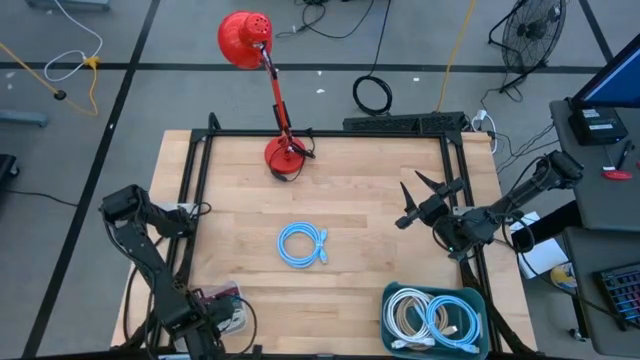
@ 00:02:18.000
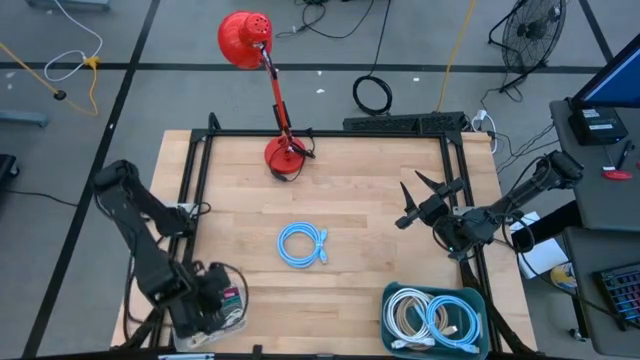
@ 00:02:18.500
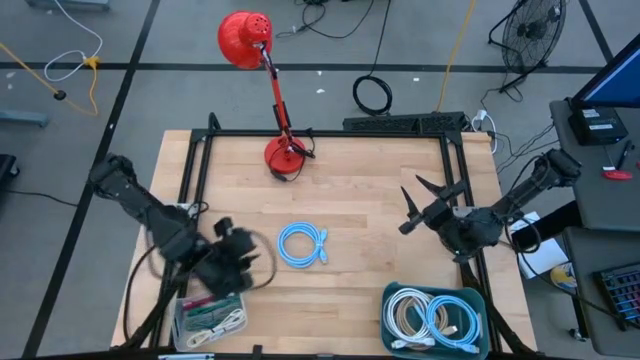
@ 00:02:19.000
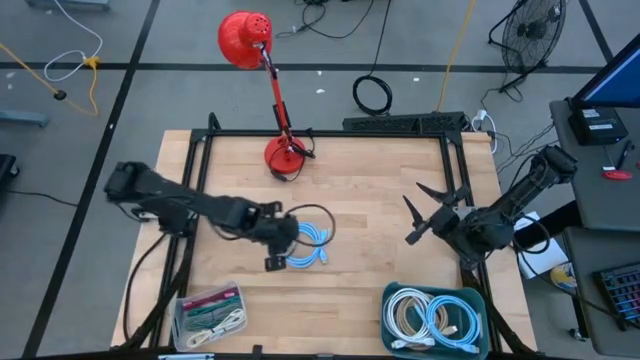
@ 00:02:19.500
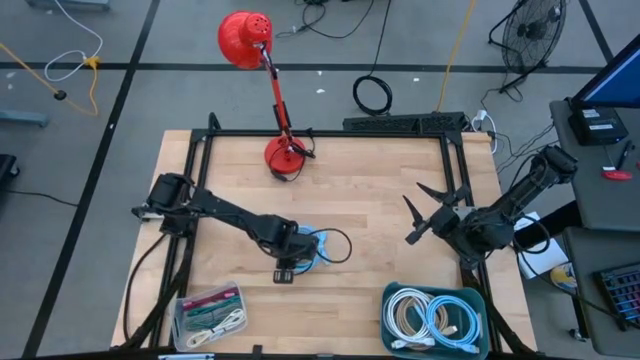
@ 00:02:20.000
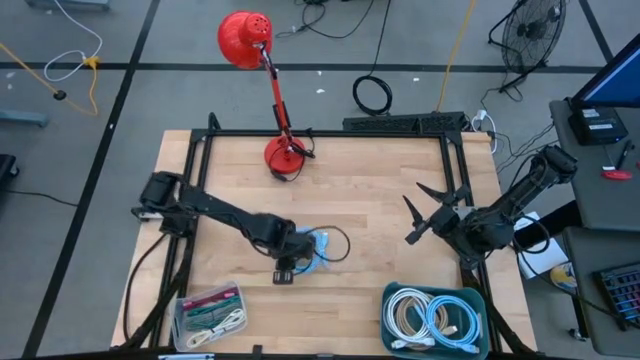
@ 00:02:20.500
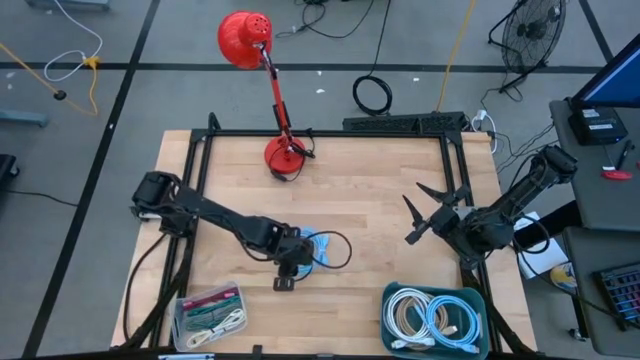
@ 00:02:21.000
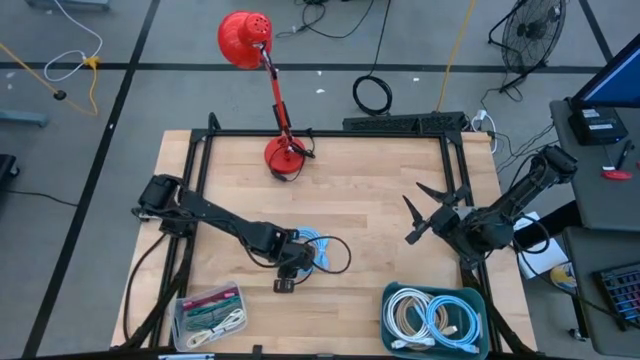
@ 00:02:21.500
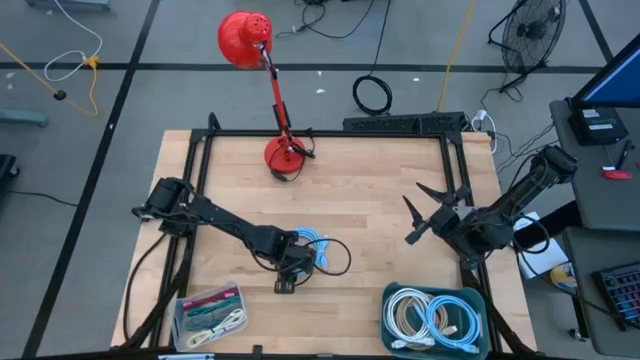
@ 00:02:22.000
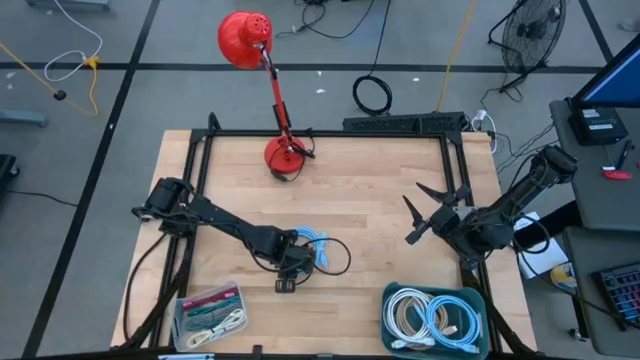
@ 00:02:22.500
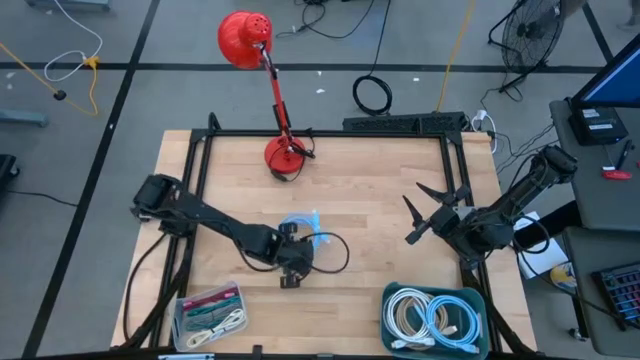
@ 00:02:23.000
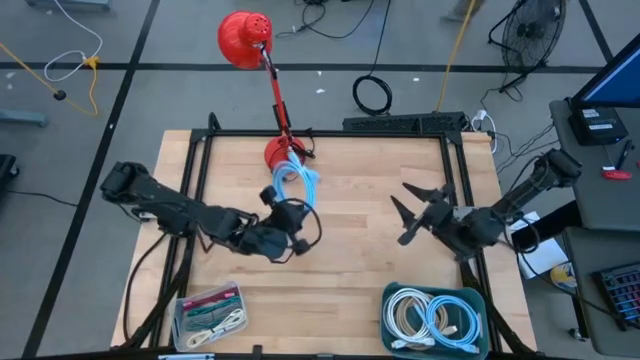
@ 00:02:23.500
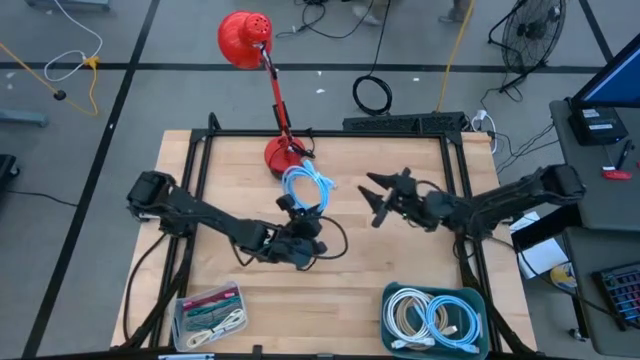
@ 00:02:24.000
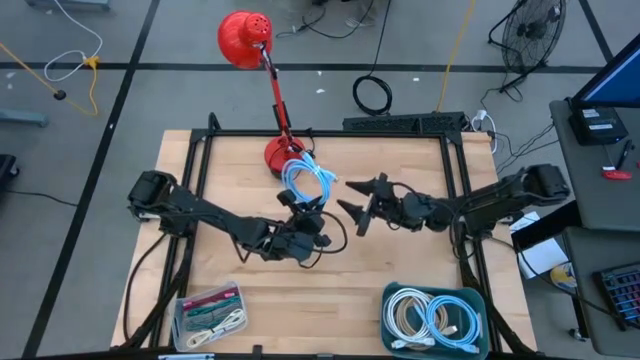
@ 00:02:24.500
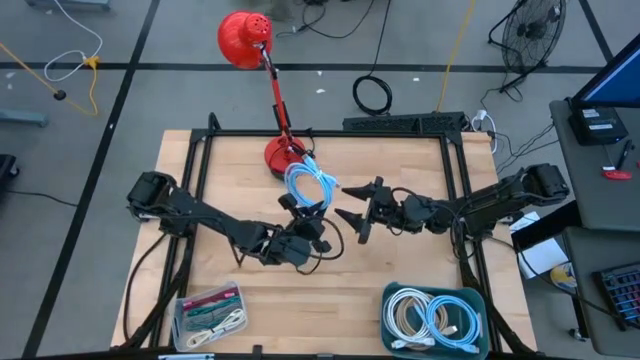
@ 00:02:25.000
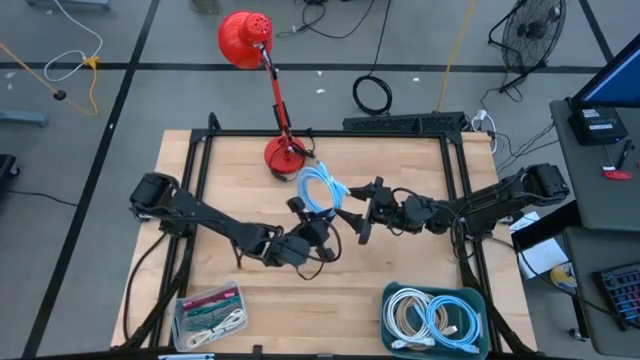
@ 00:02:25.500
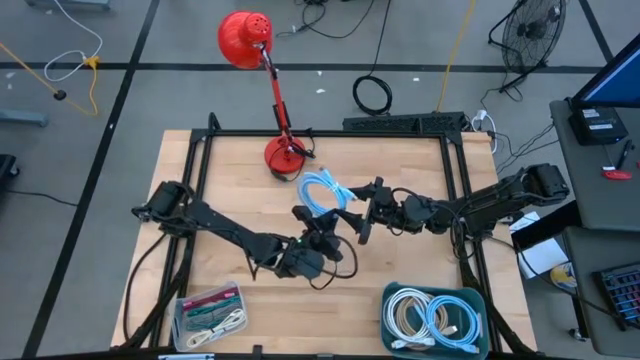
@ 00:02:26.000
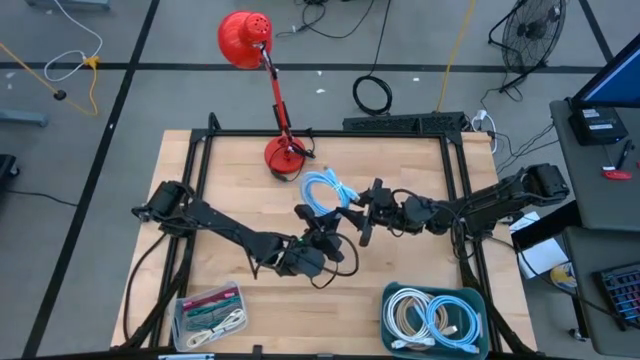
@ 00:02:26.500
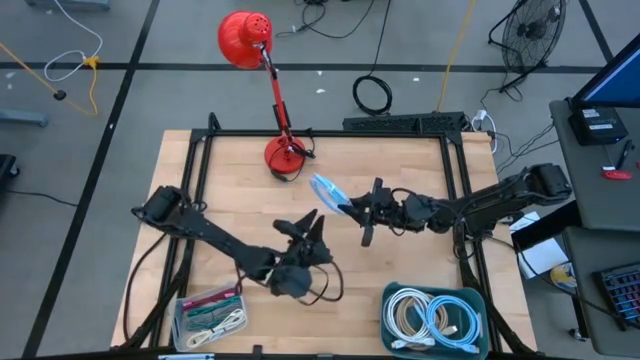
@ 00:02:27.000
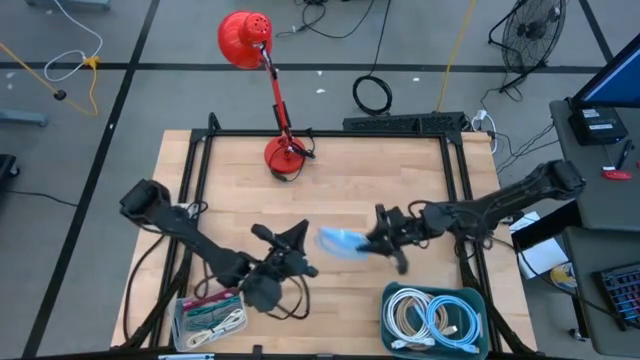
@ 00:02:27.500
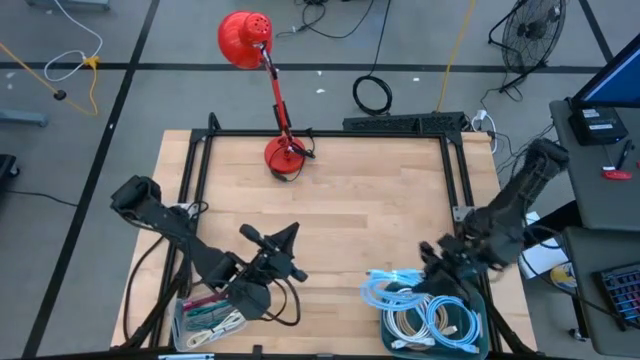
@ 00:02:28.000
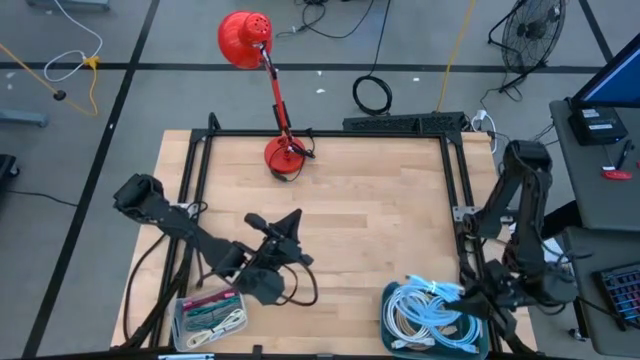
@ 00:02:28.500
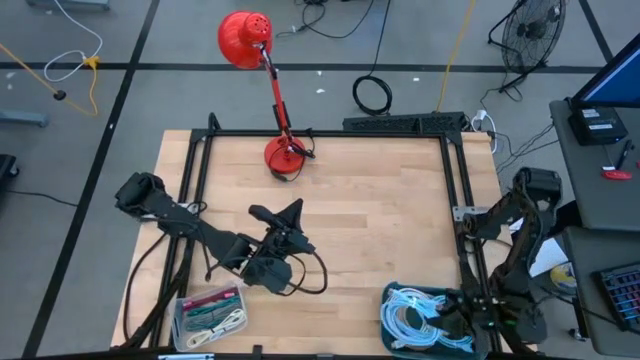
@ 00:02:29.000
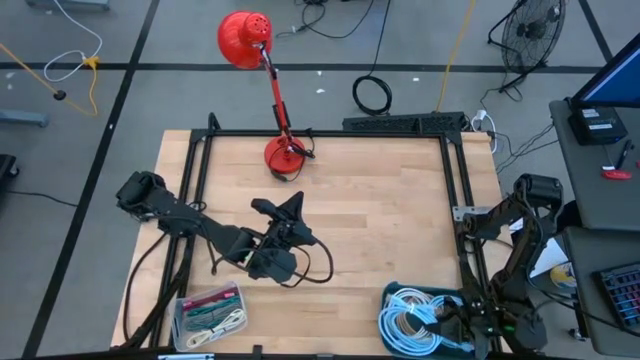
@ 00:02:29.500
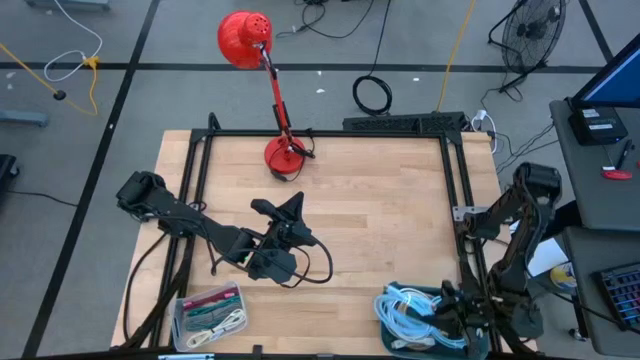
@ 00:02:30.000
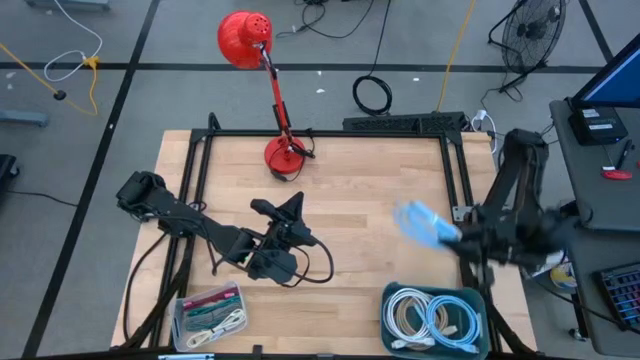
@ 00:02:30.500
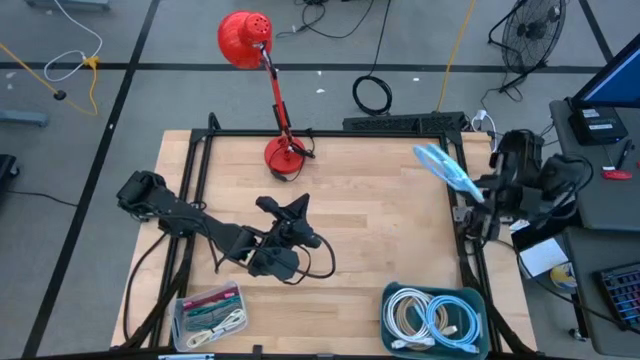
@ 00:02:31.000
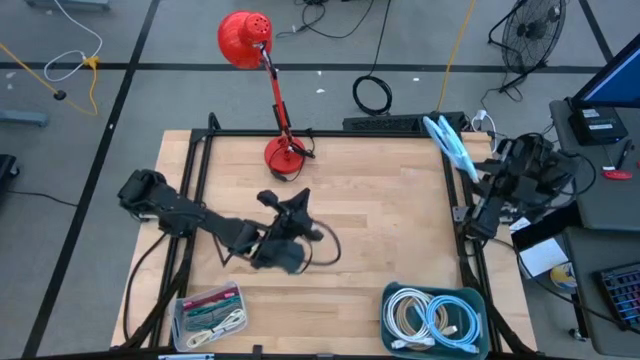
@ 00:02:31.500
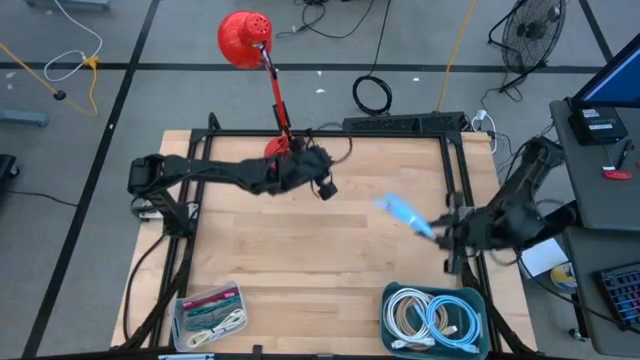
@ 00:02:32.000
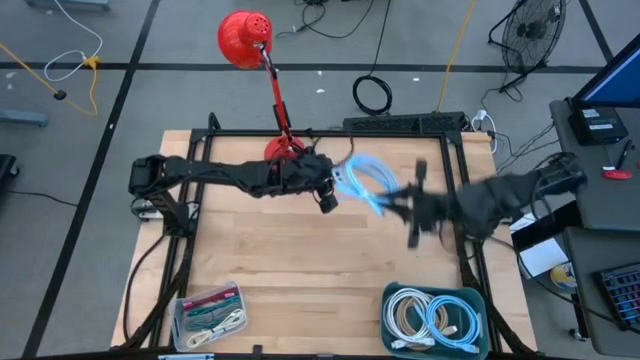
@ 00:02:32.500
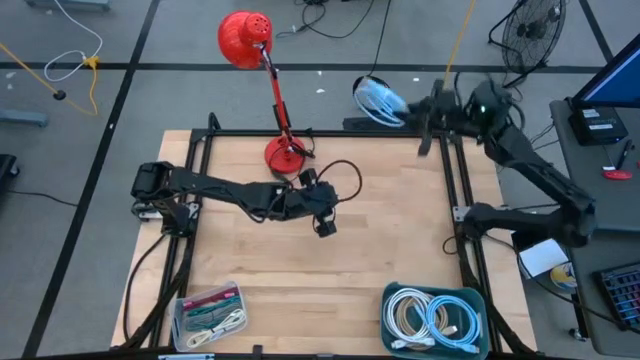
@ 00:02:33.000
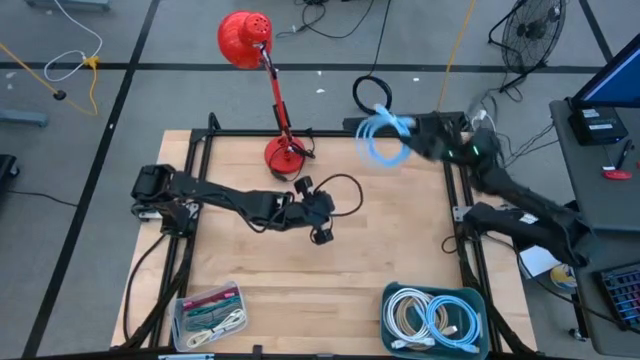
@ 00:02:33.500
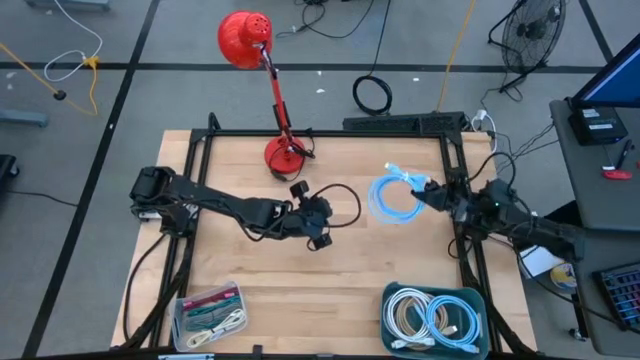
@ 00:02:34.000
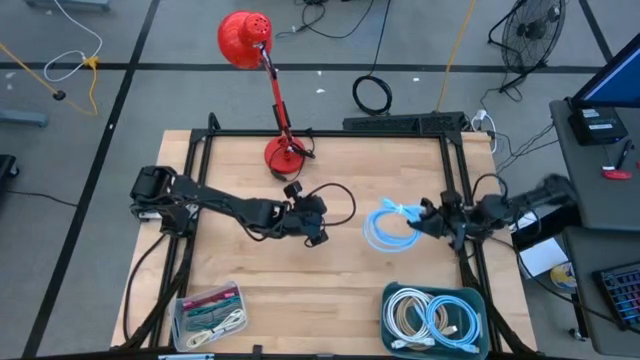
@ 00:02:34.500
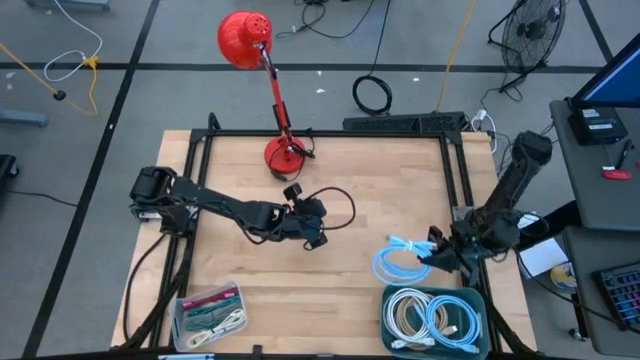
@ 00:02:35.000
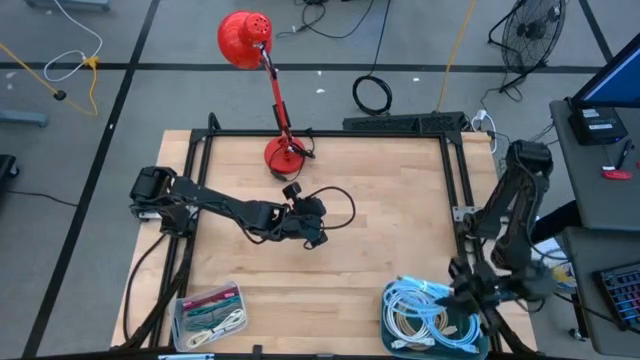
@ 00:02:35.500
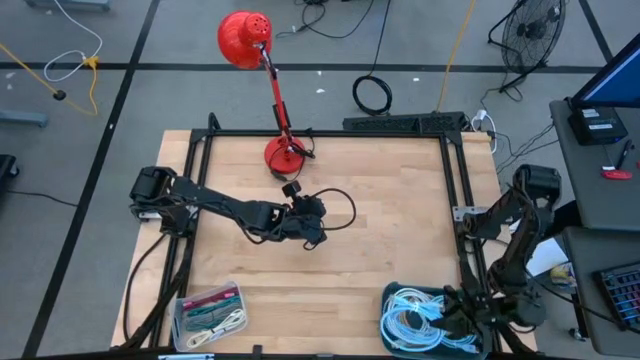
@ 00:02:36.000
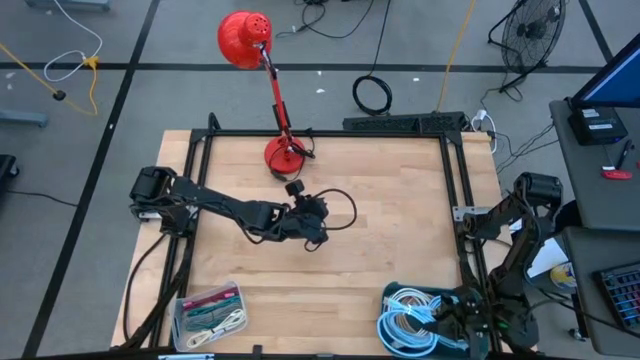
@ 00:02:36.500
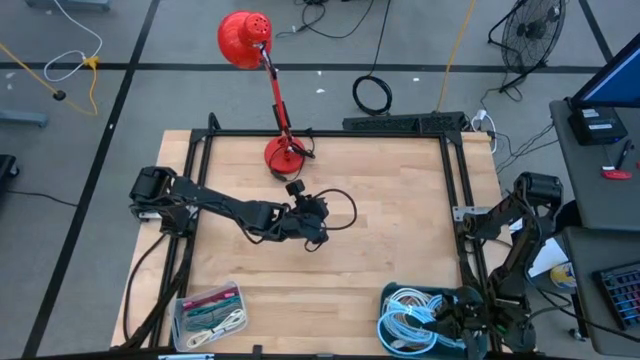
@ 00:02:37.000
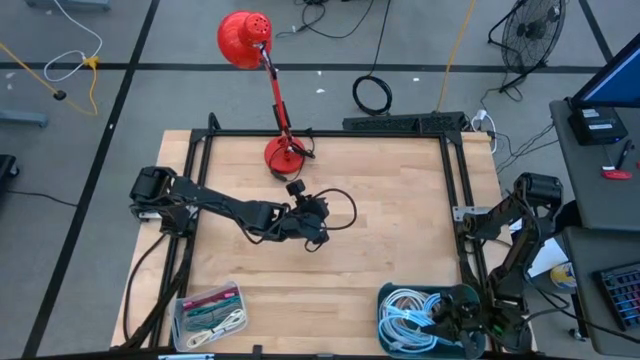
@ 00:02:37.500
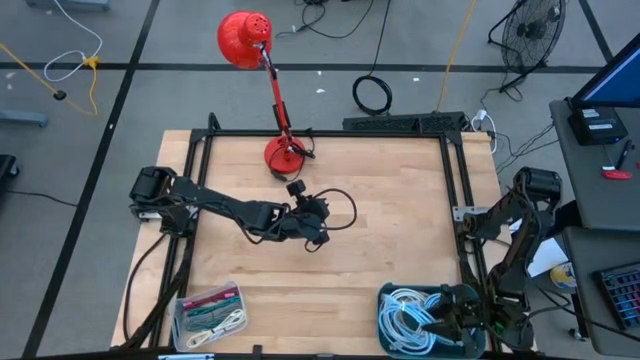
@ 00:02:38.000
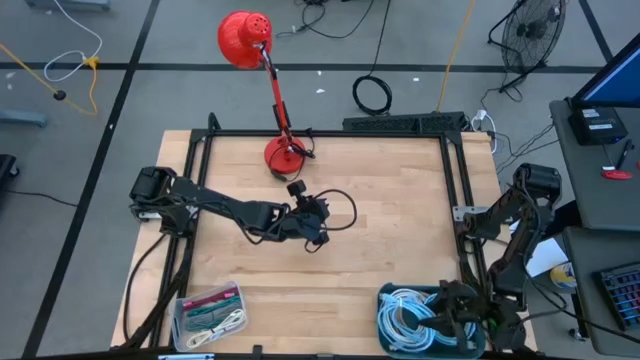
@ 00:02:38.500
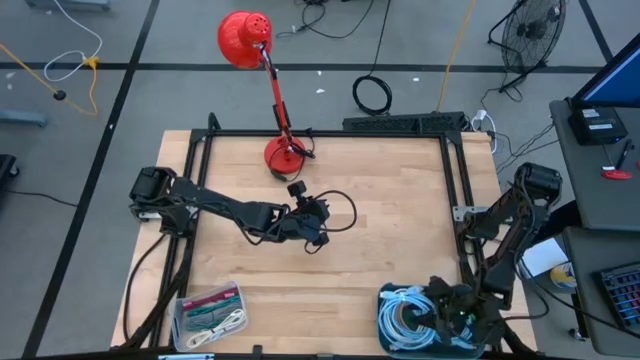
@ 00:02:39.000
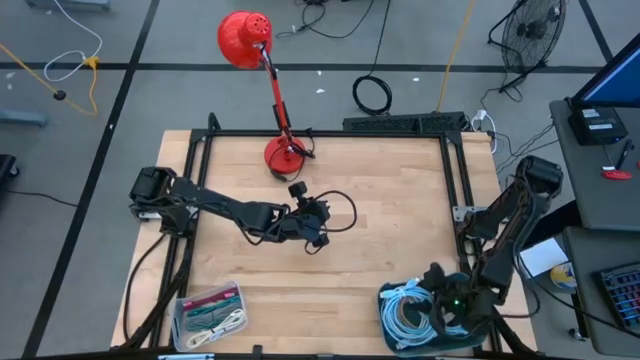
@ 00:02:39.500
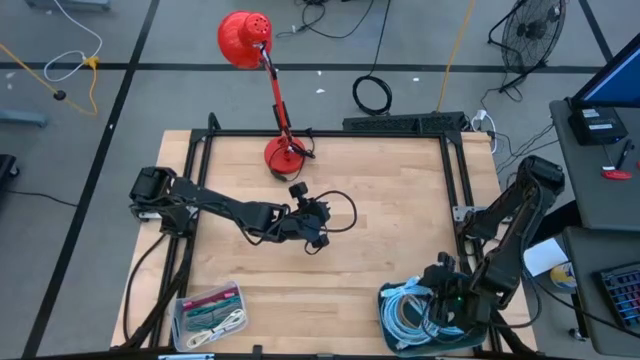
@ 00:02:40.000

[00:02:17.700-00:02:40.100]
Task: Pick & Place USB Port
Put the blue charger cable into the blue bin
